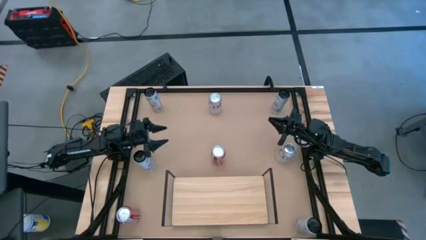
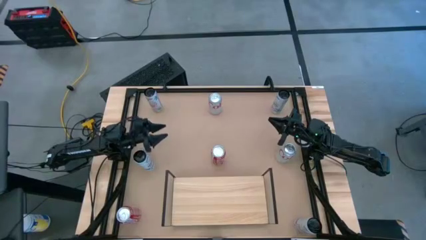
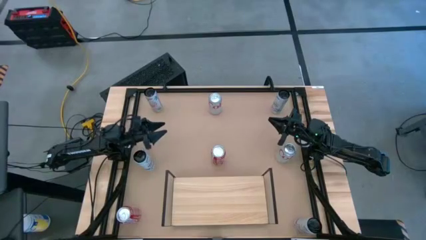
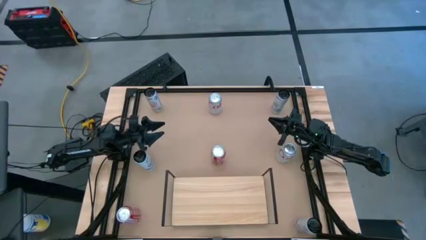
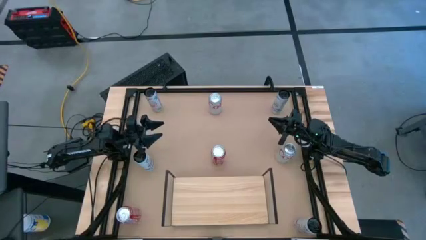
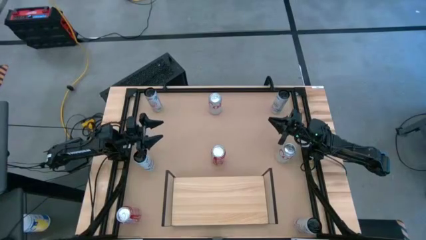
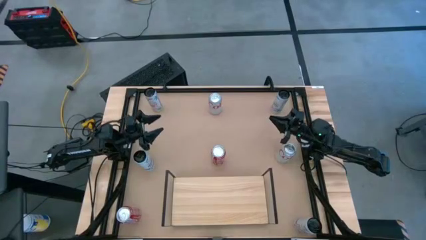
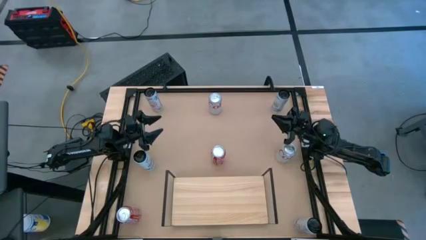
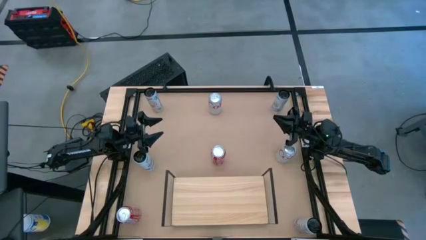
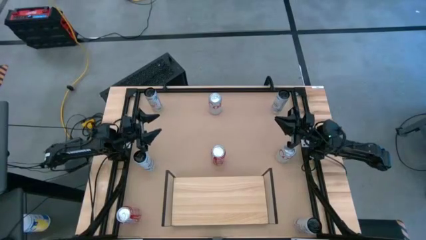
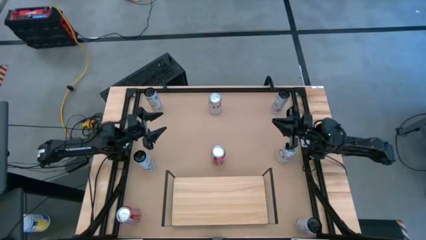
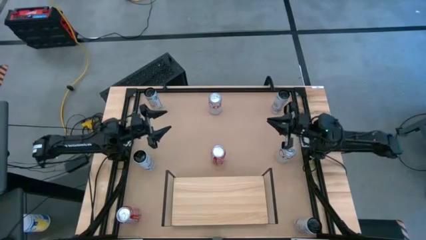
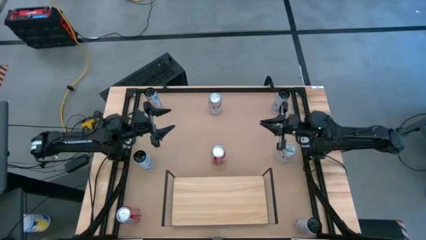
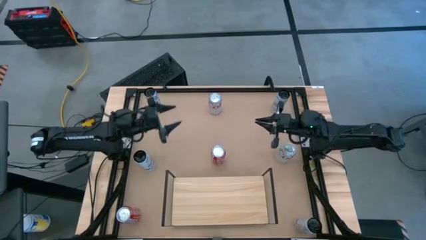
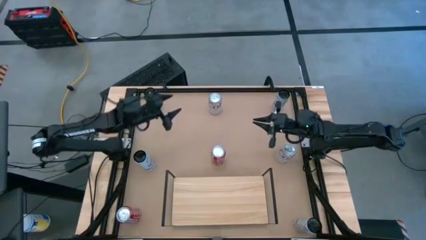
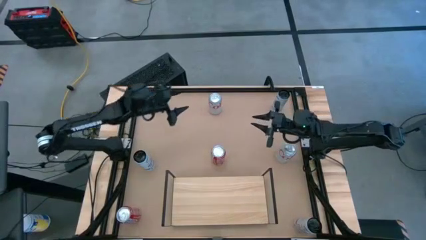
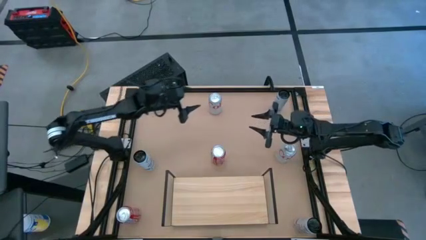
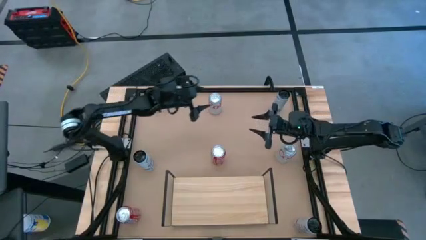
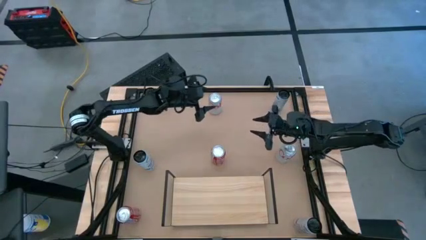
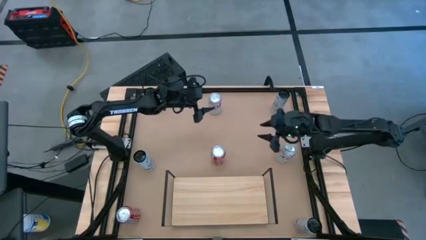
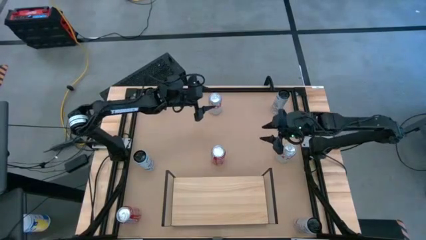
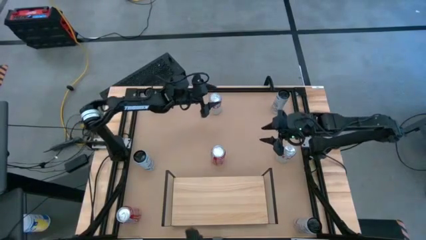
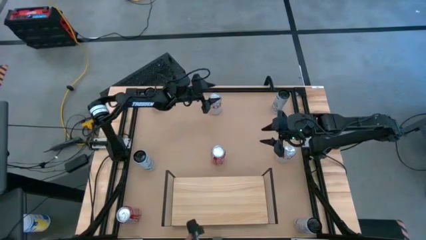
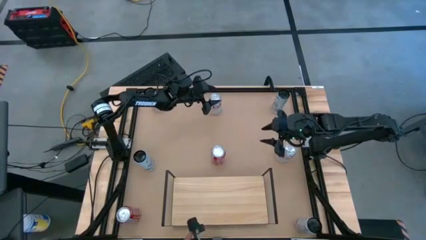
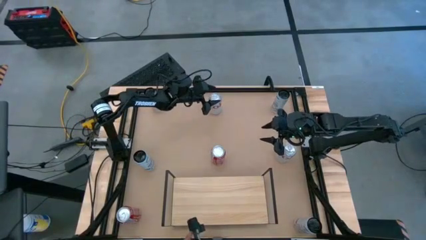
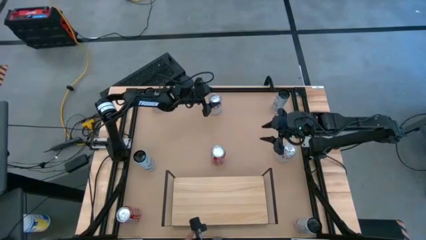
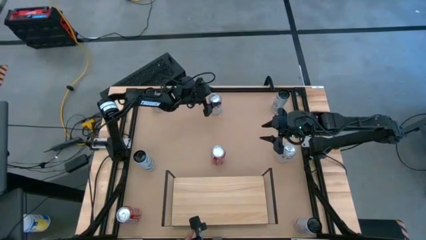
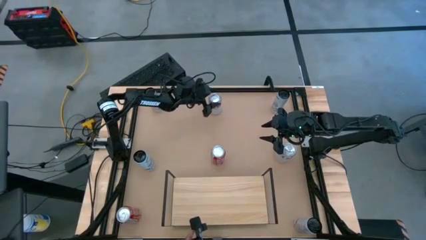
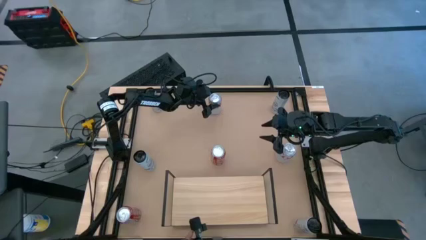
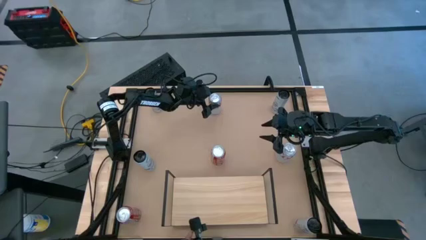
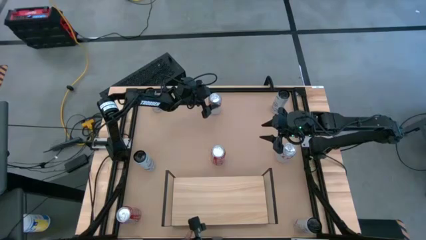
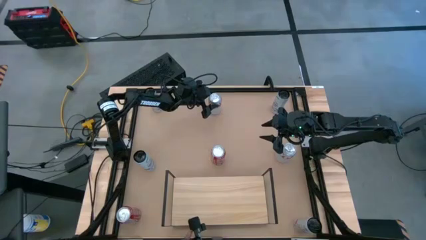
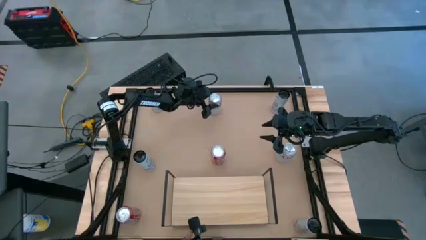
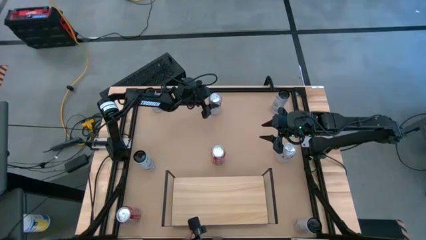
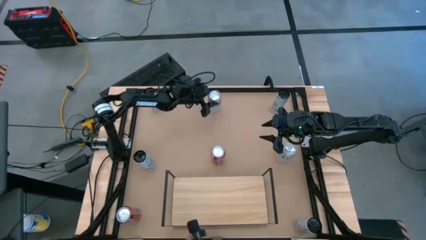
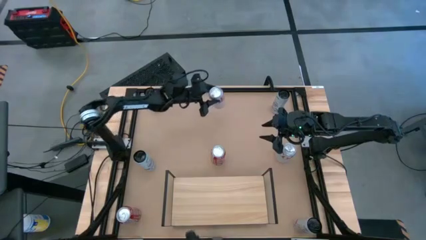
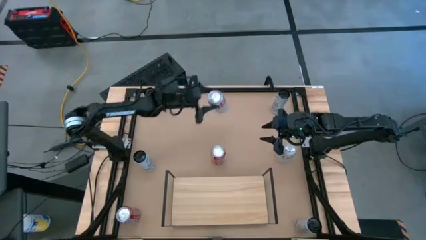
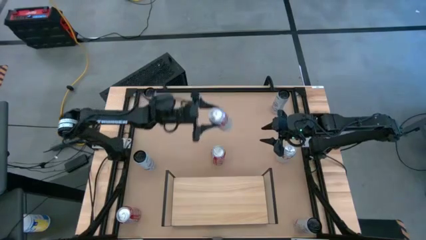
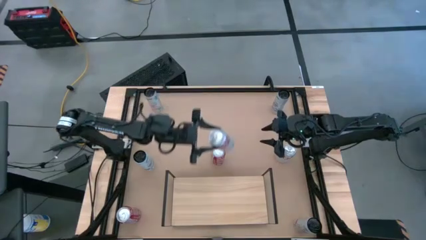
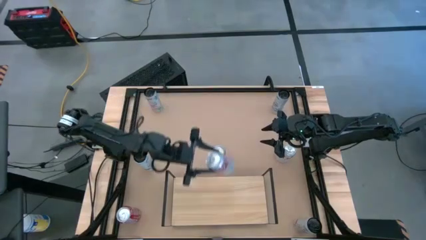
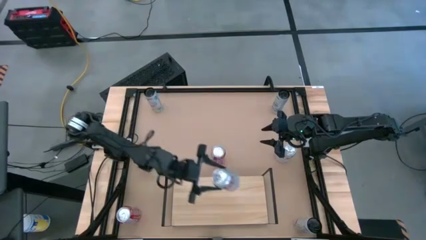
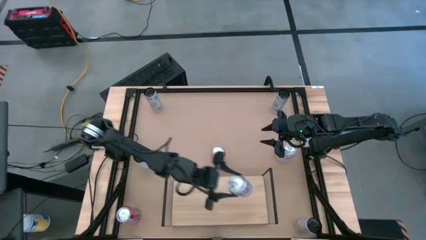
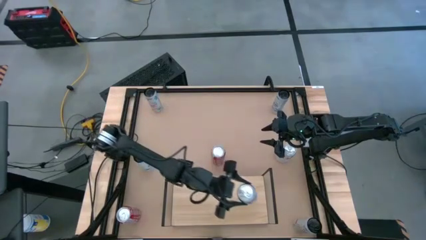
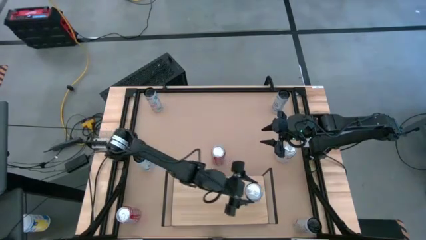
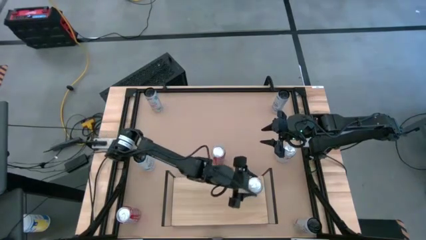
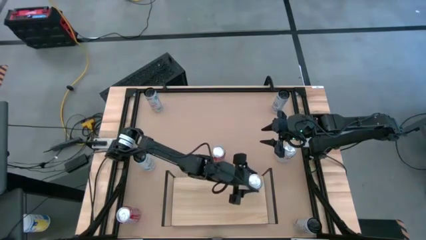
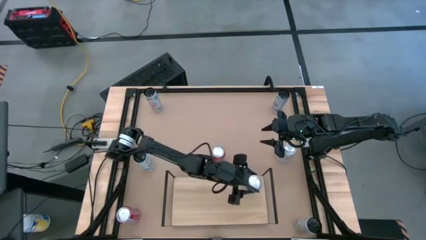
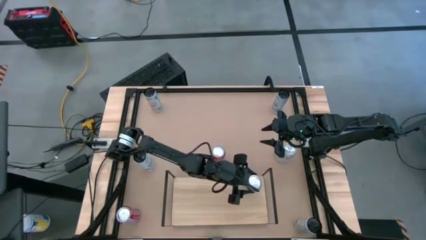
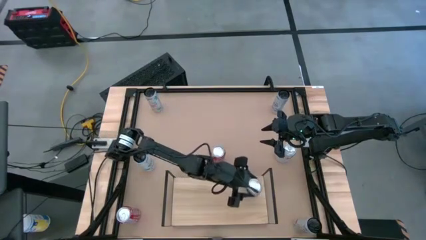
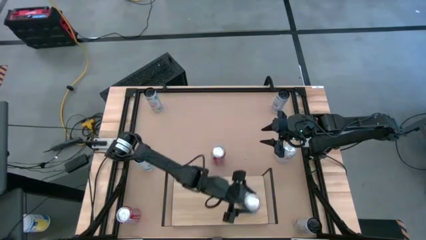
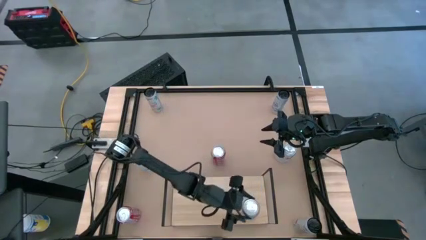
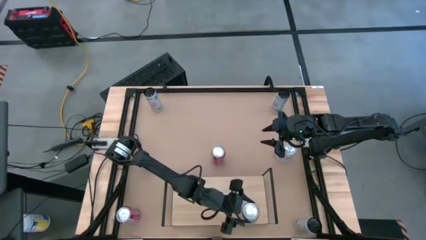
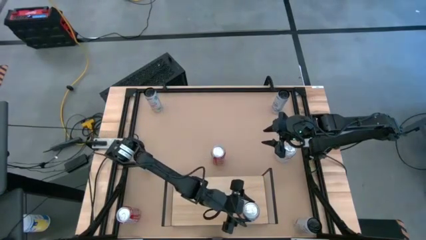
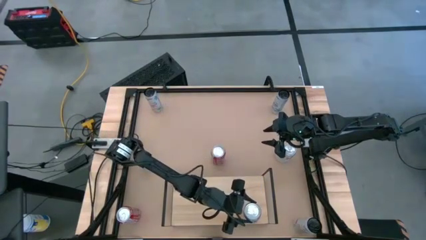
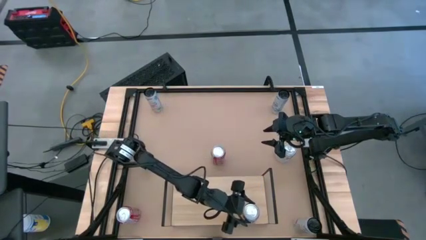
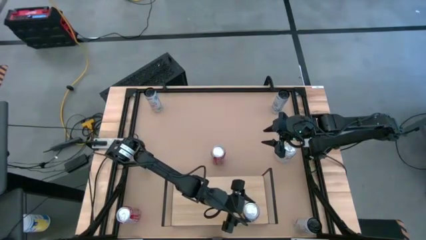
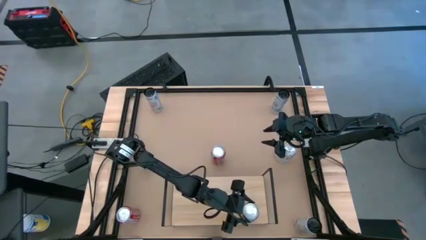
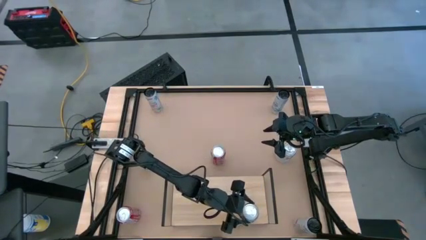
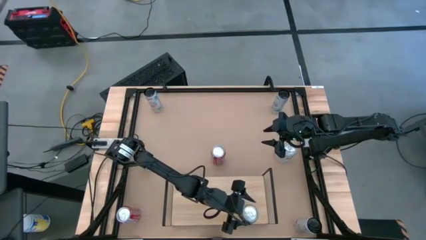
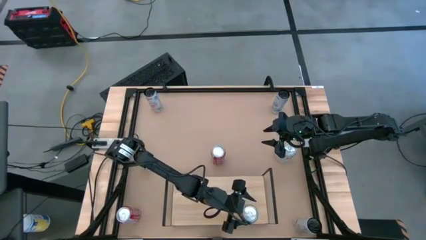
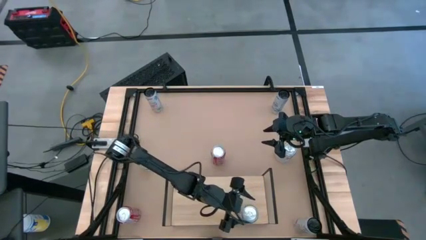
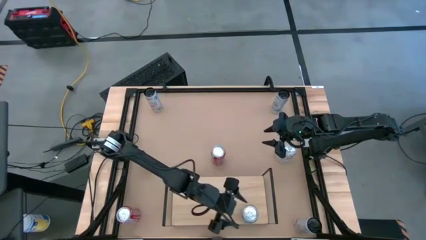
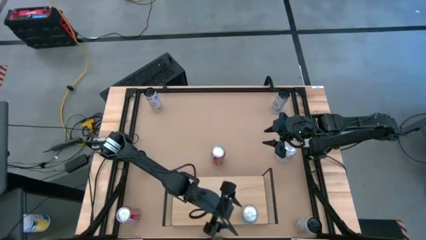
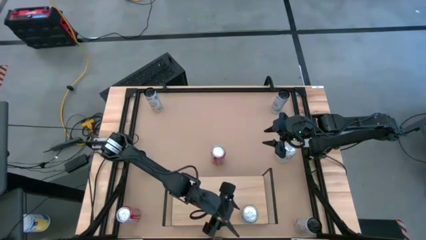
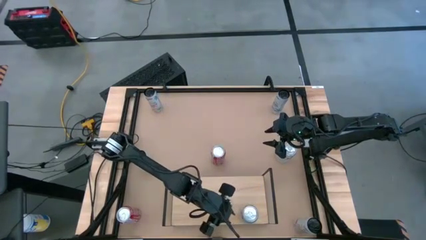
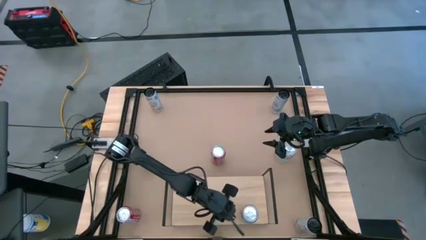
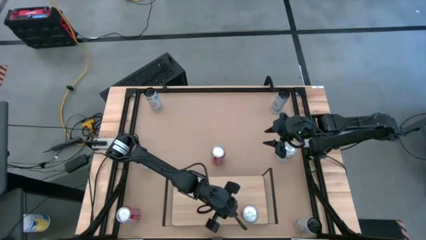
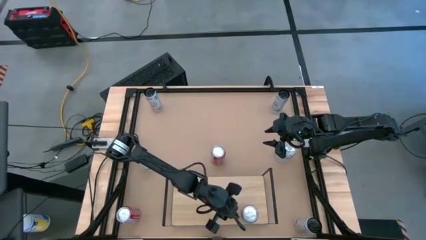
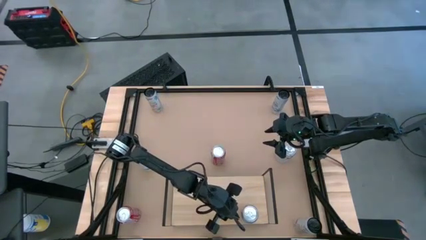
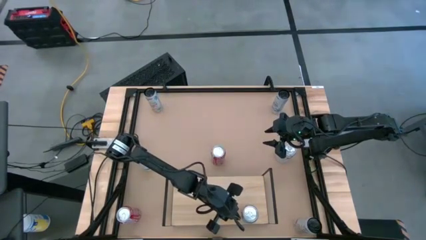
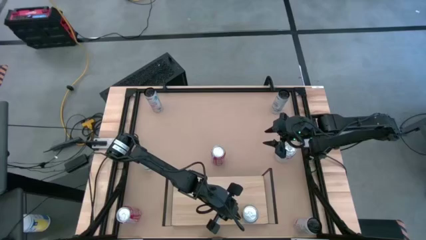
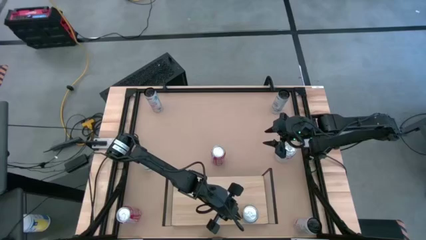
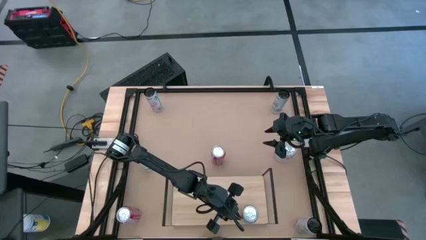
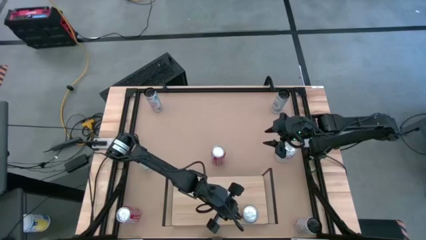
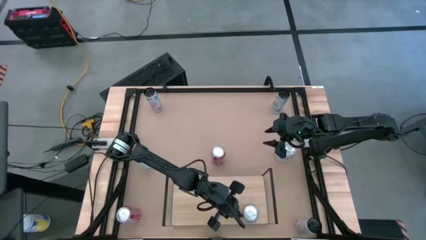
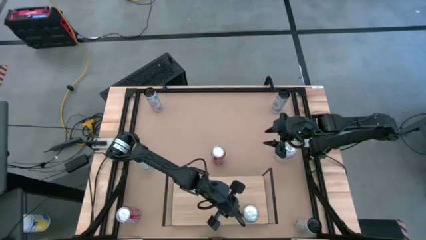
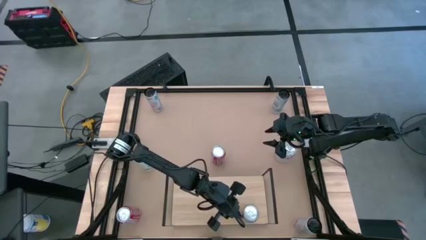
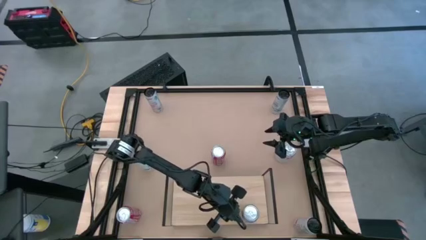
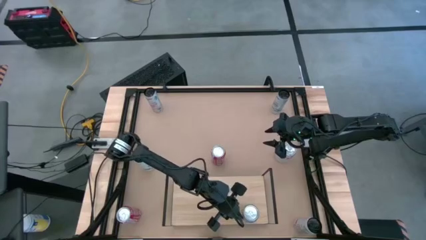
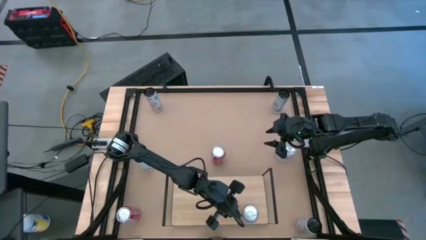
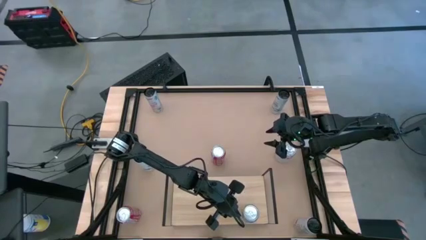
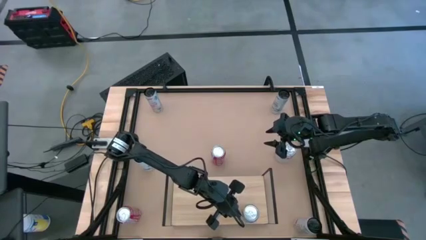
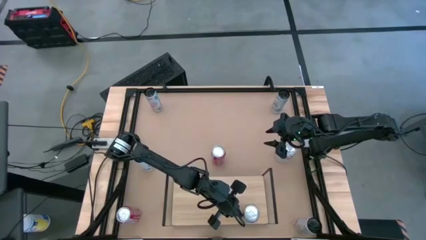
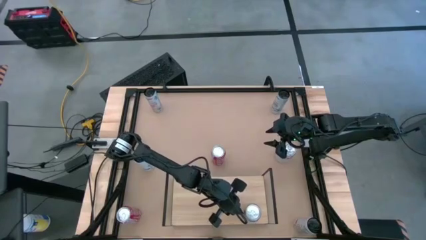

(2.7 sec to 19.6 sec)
Task: Place canned beverage on shelf
Put the top silver soda can on the shelf
